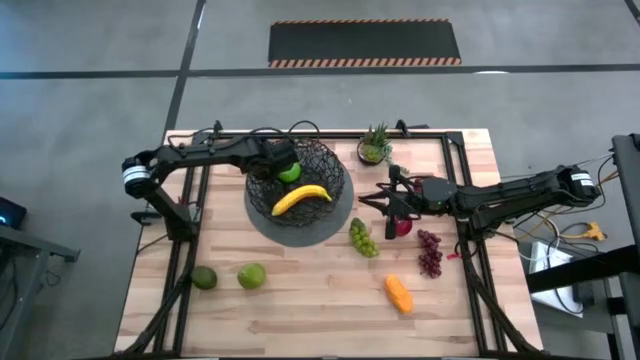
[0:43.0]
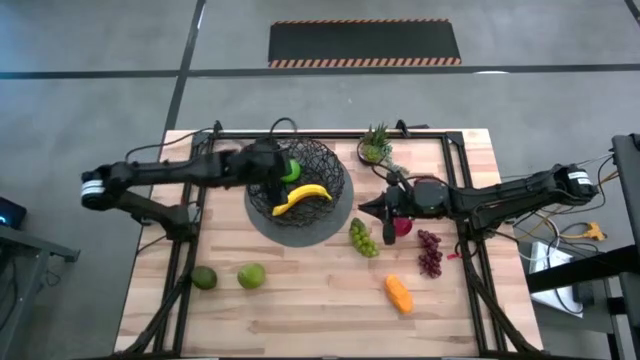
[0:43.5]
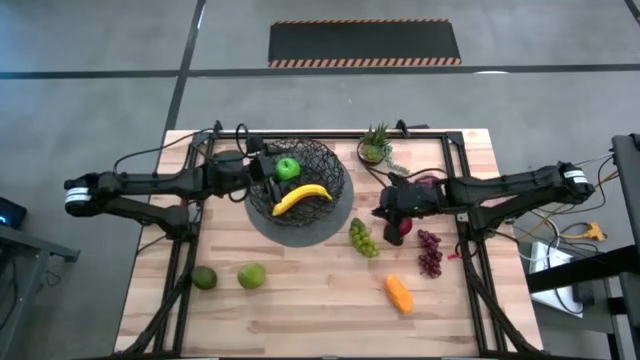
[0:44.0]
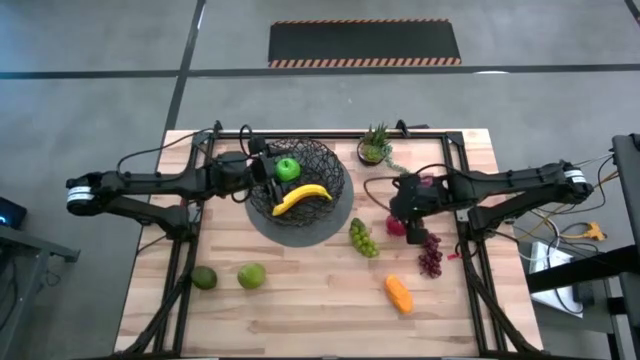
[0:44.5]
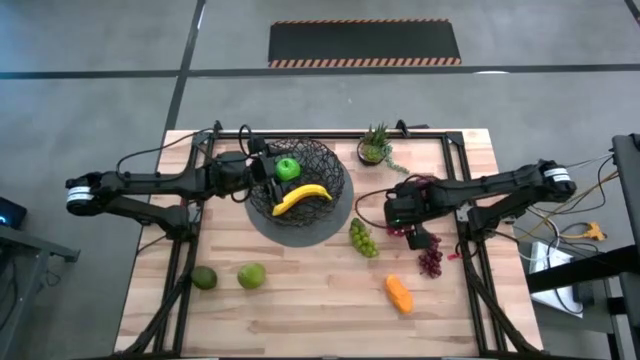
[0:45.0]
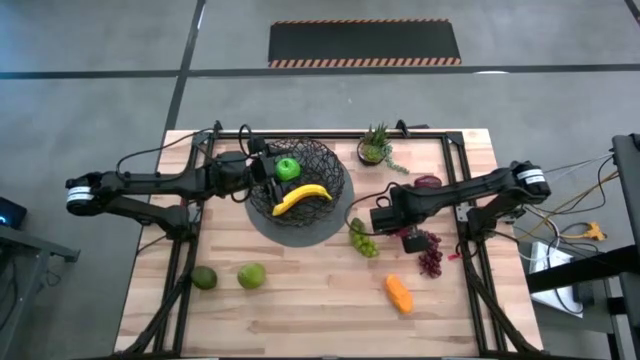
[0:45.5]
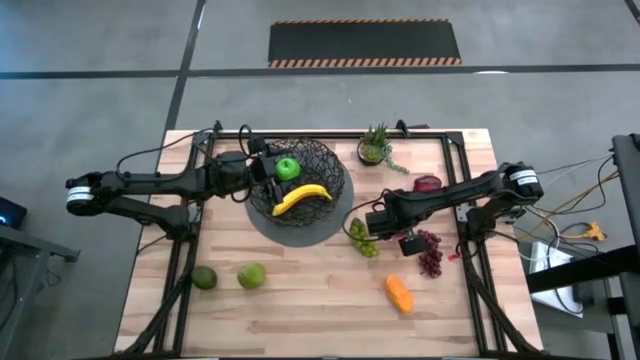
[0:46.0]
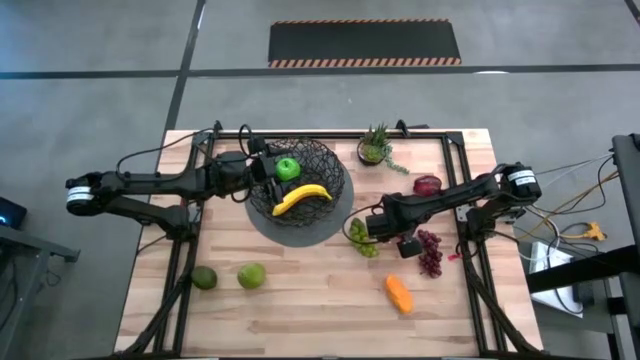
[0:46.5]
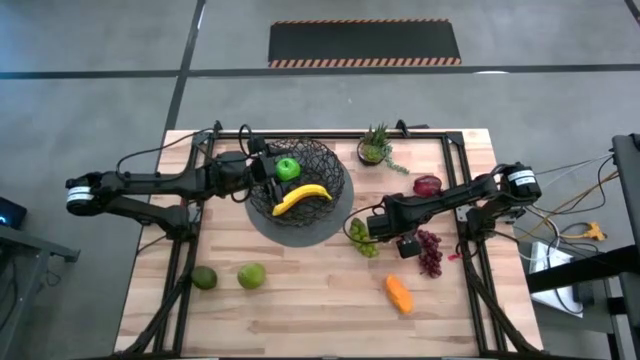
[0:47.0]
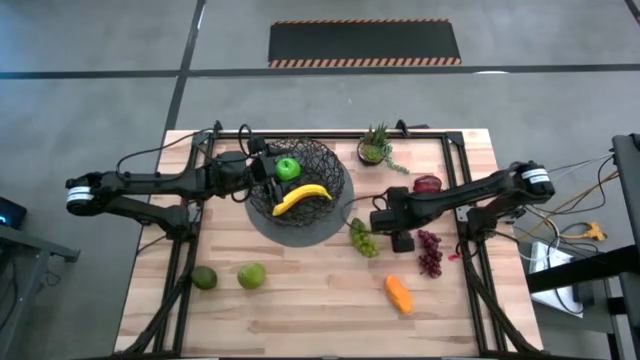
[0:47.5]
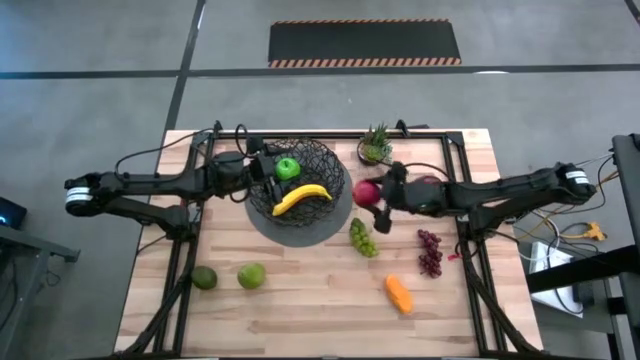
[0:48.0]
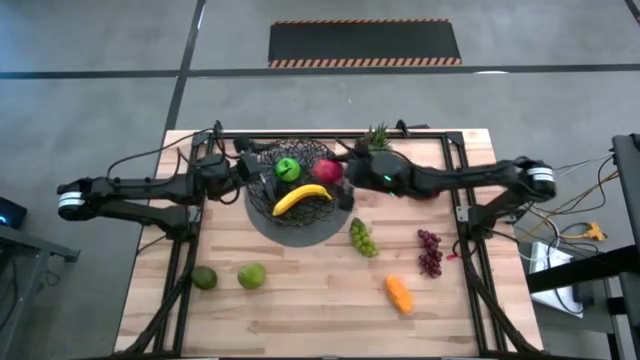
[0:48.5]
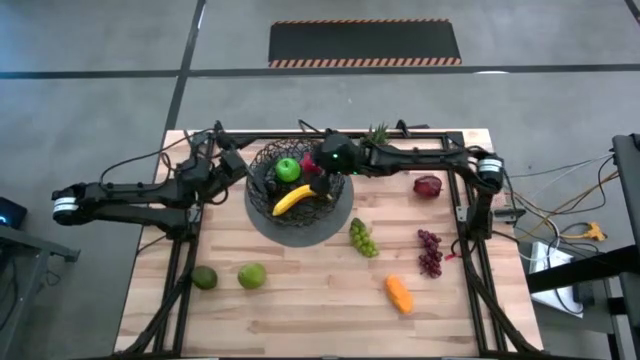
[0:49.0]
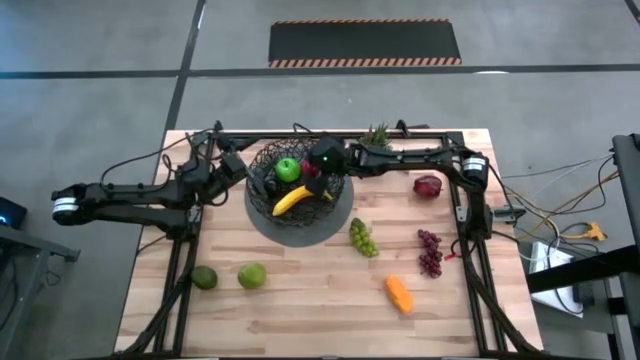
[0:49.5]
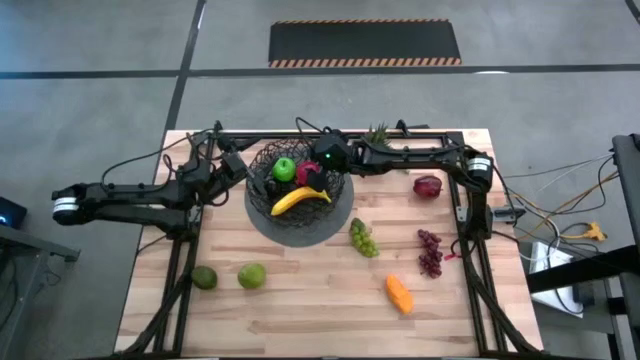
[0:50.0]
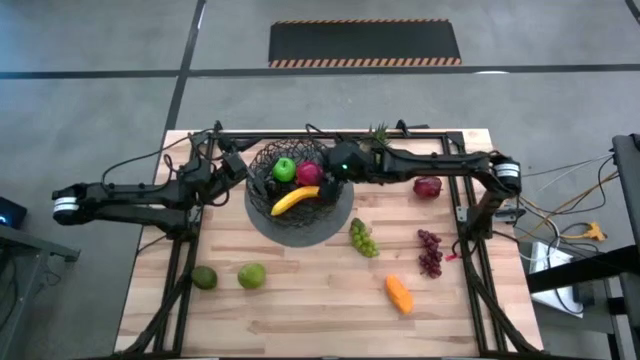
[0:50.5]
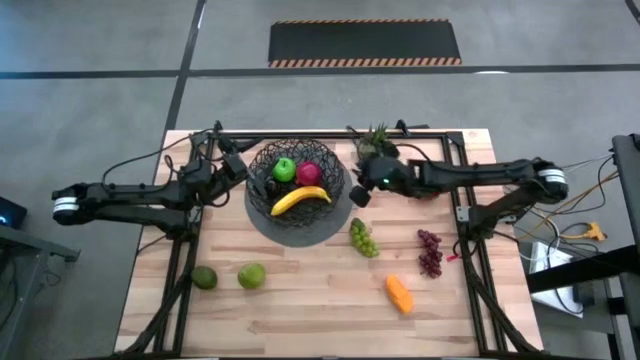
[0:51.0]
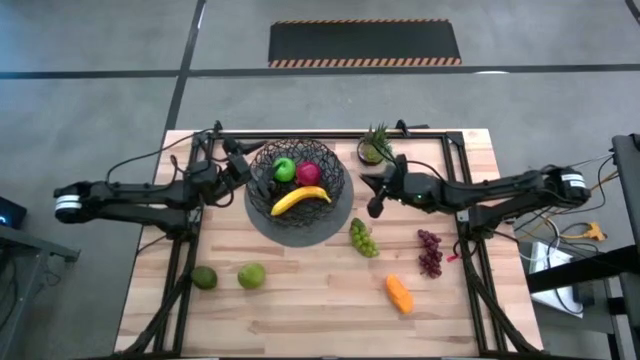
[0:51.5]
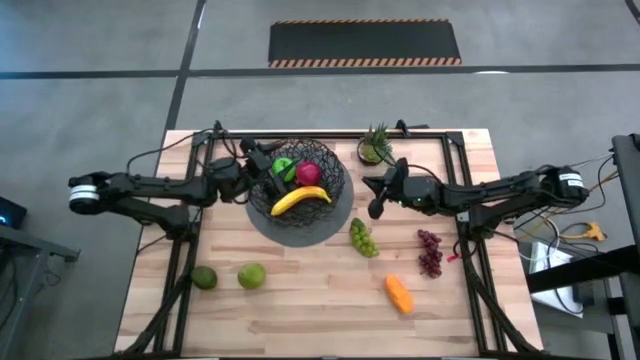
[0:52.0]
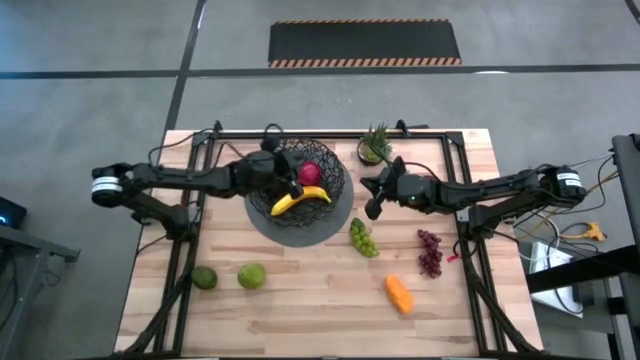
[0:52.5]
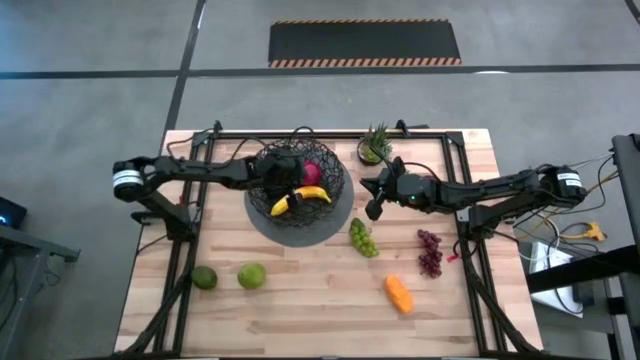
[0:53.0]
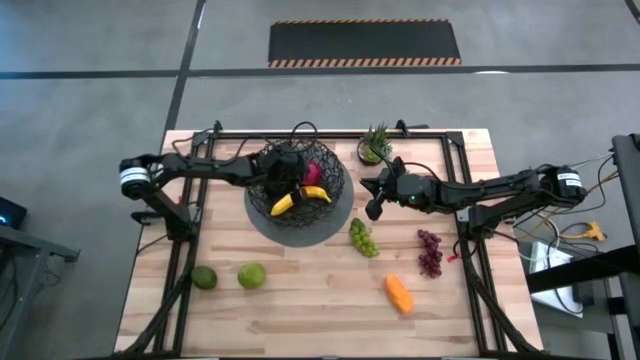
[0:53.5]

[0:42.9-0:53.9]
Task: Build produce basket
Put the pomegranate into the black wire basket

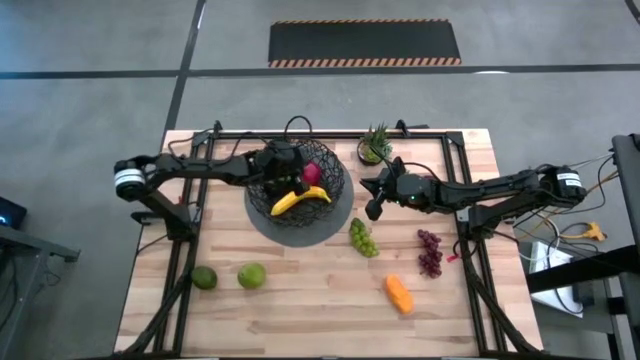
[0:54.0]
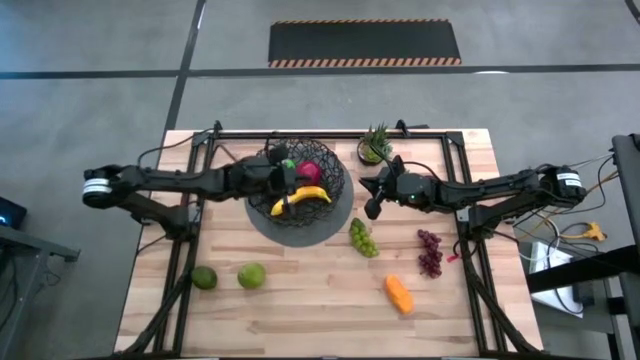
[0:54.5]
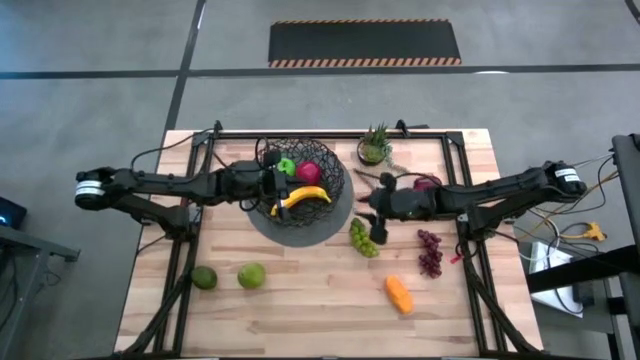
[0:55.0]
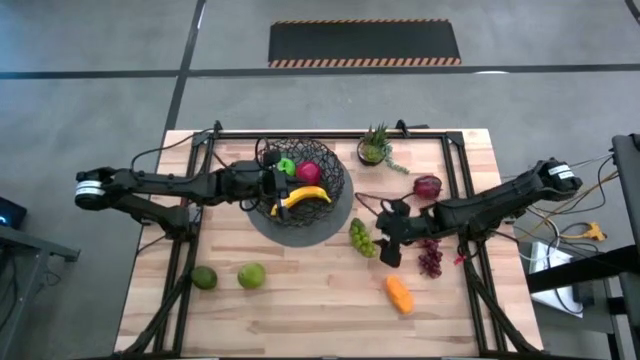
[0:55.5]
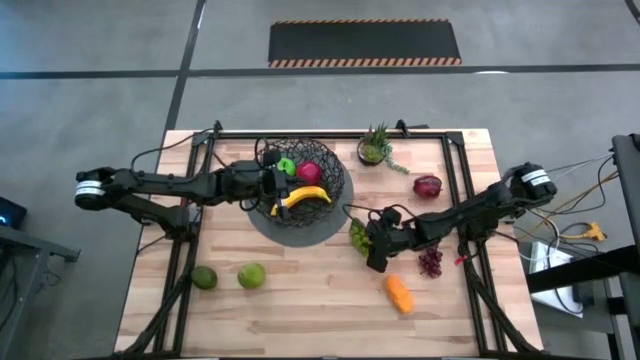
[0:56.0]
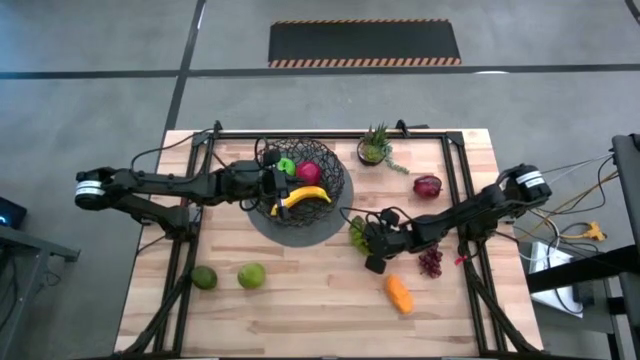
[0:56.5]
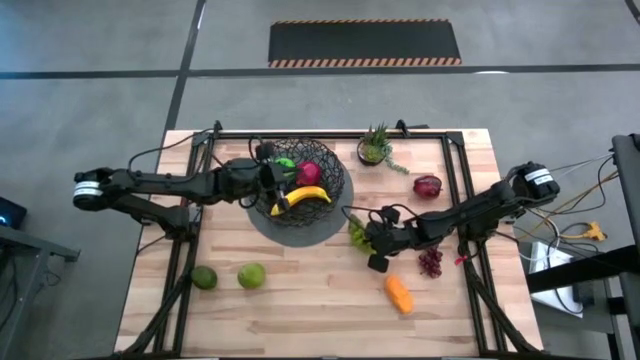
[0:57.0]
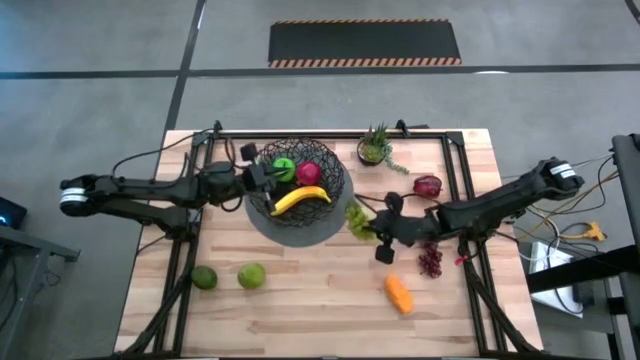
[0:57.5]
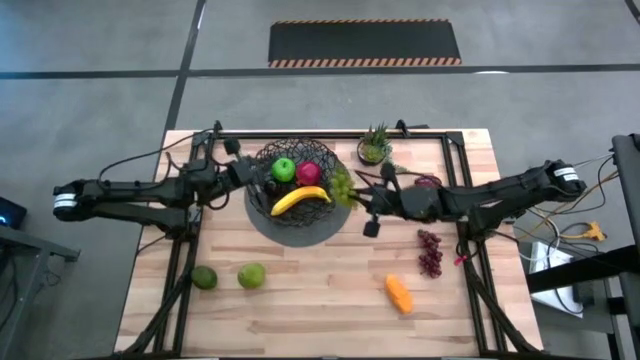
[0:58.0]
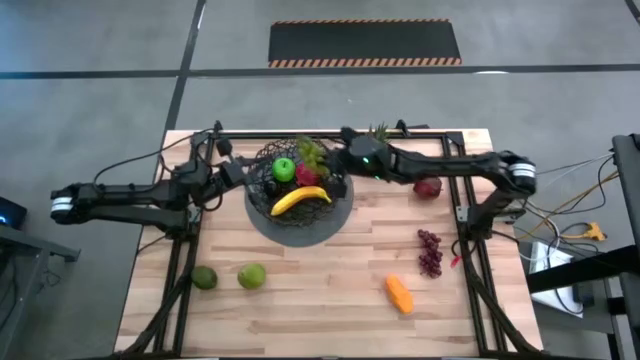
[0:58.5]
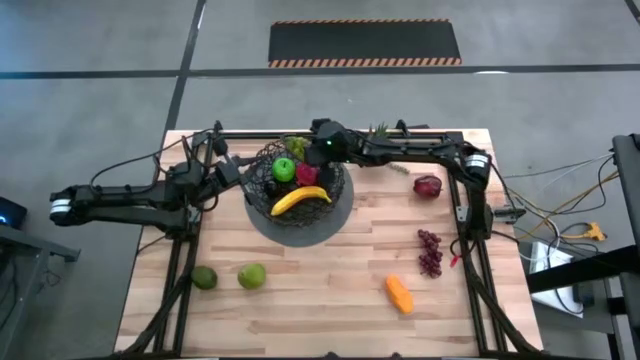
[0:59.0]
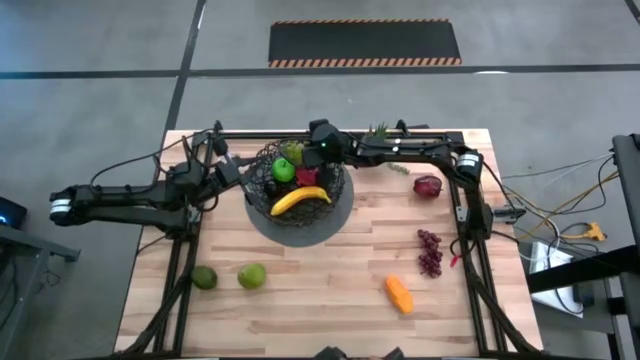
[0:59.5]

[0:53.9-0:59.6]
Put the green grapes into the black wire basket

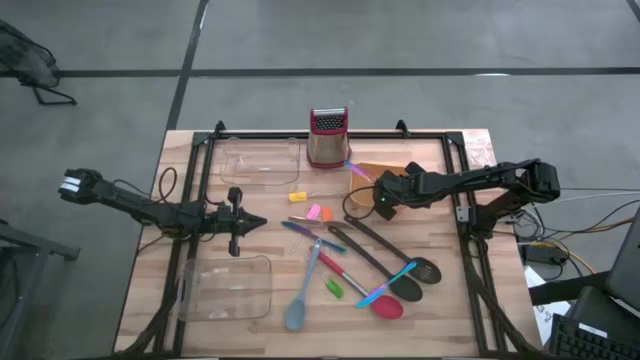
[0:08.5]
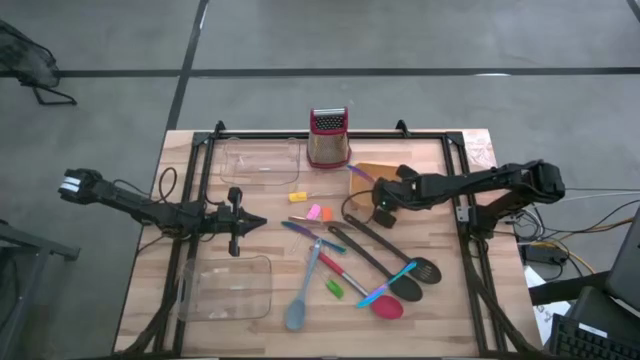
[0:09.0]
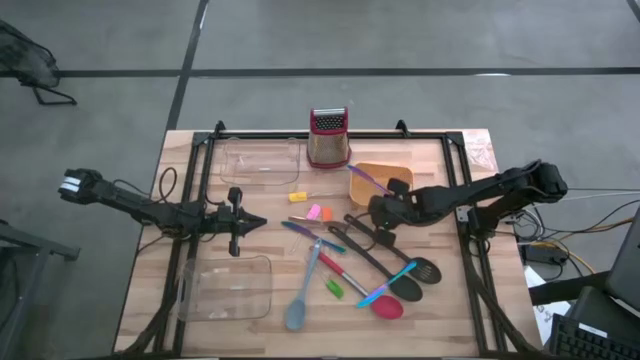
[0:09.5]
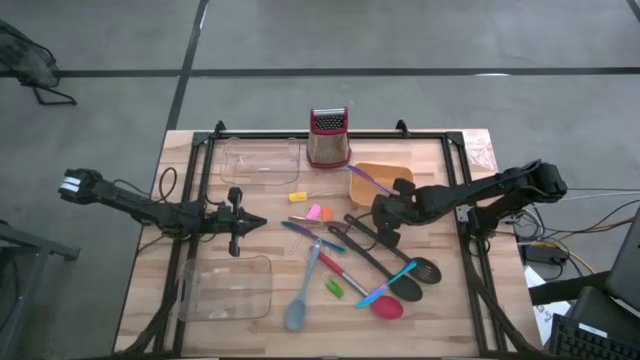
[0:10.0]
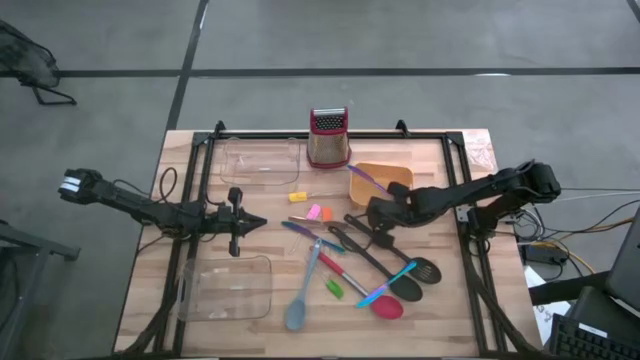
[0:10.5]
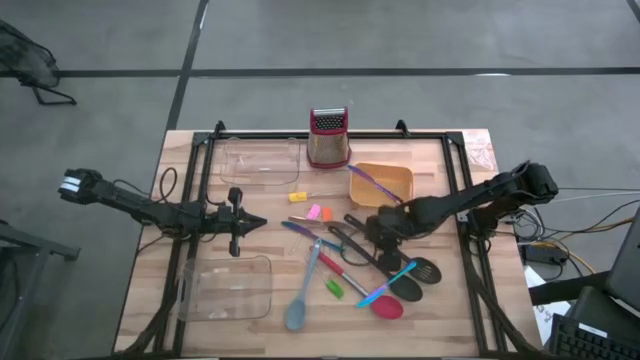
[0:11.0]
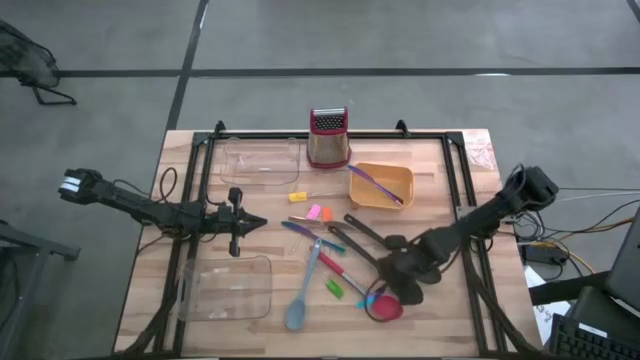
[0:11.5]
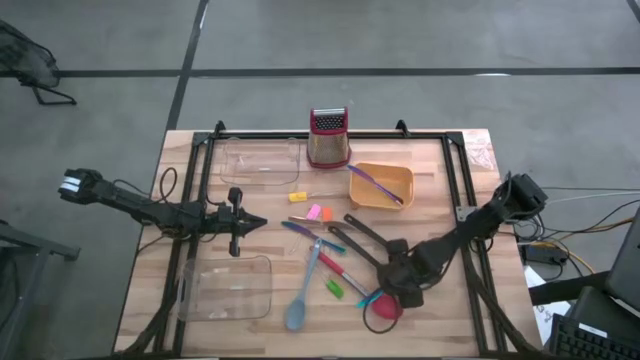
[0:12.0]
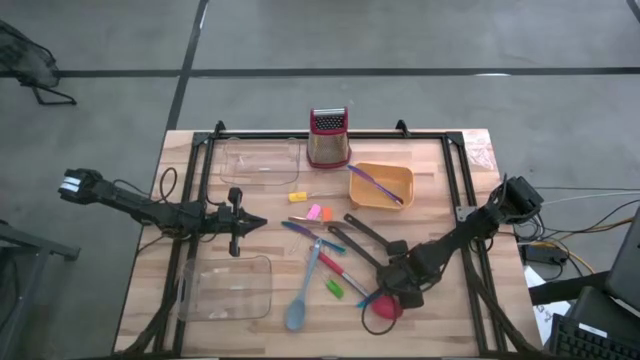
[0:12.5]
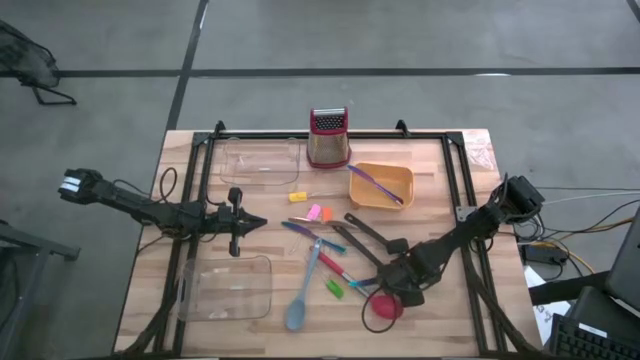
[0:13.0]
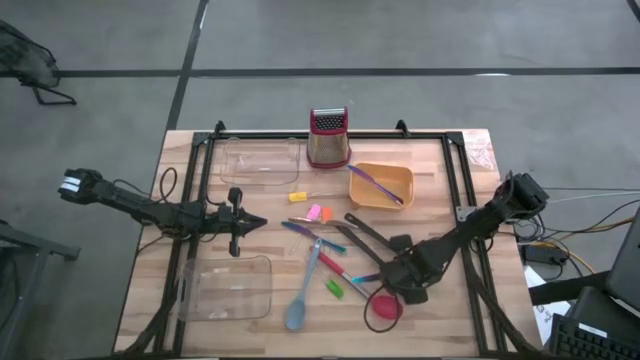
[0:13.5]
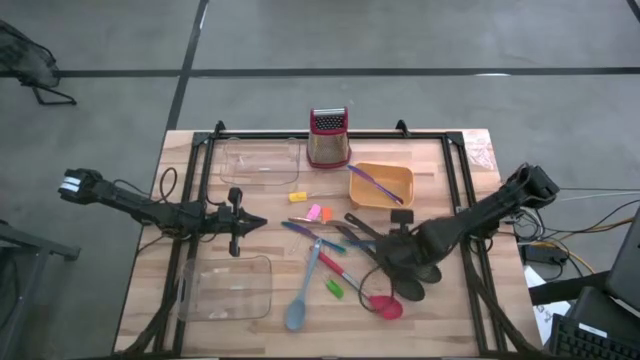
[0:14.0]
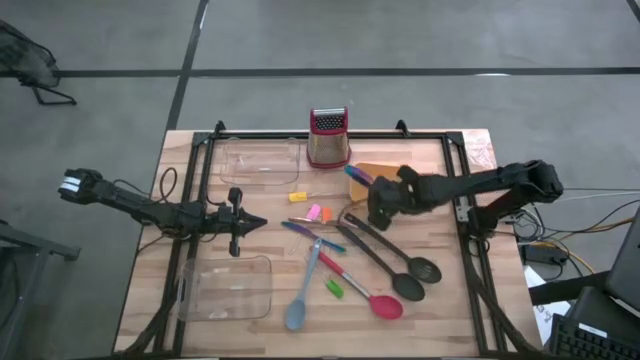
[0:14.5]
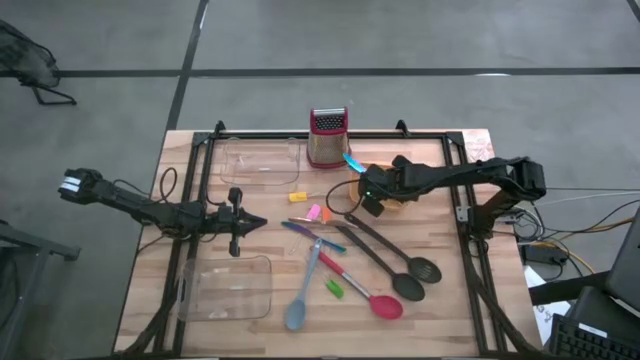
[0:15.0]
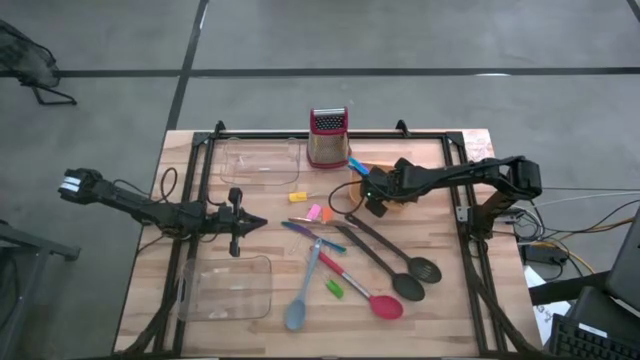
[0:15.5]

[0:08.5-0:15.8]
Task: Pick & Place Kitchen Items
Put the bottom blue knife into the yellow bin
